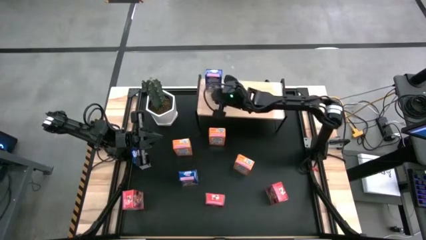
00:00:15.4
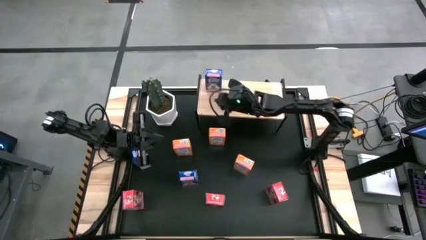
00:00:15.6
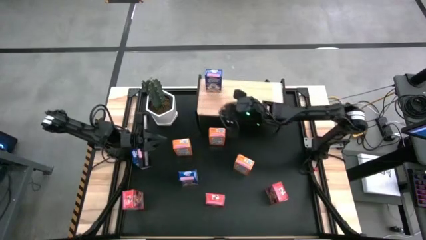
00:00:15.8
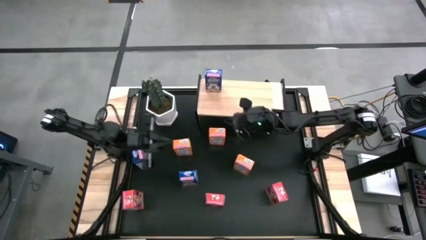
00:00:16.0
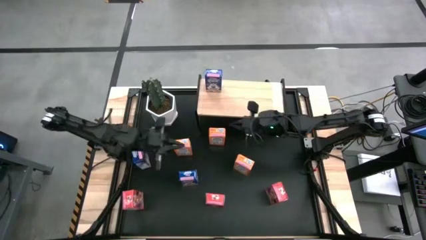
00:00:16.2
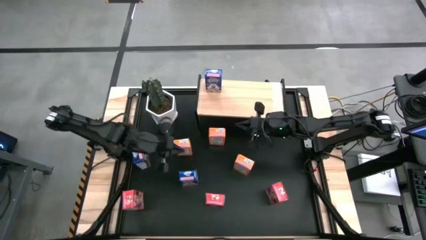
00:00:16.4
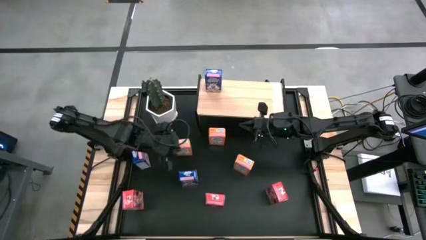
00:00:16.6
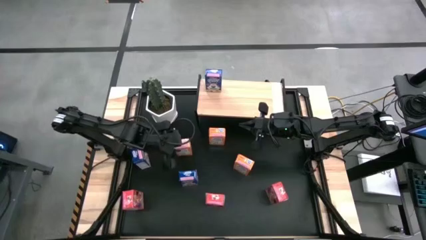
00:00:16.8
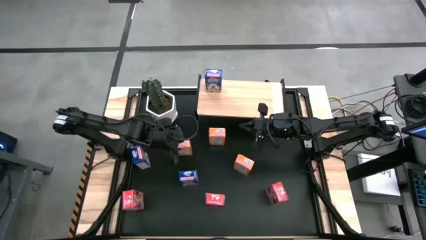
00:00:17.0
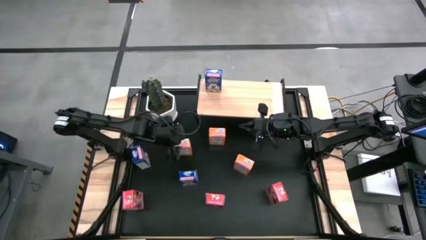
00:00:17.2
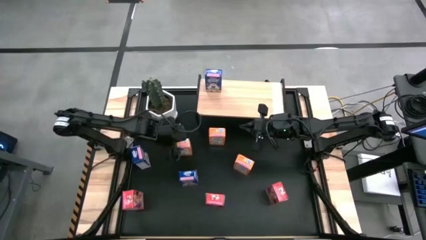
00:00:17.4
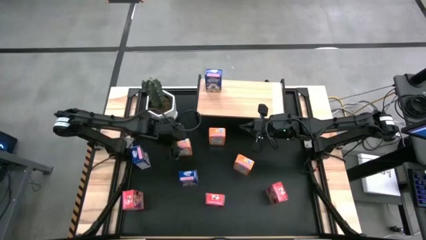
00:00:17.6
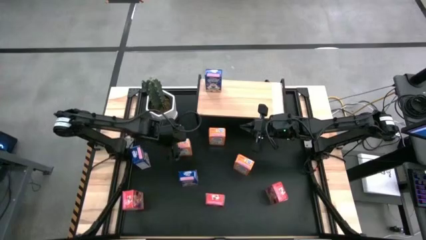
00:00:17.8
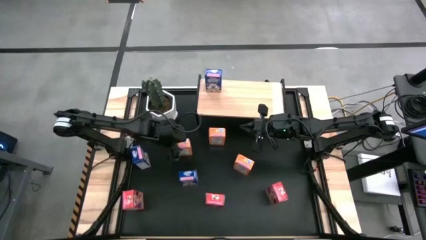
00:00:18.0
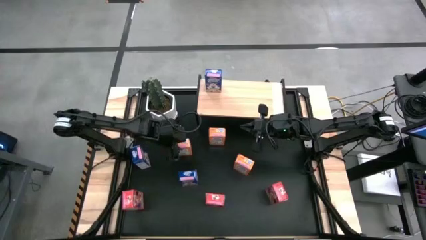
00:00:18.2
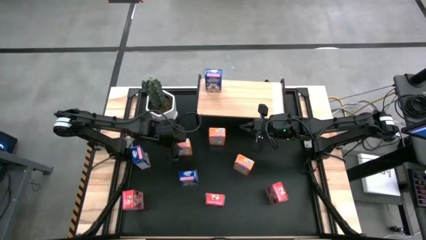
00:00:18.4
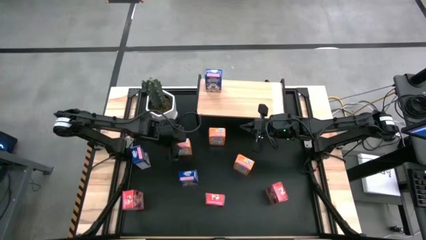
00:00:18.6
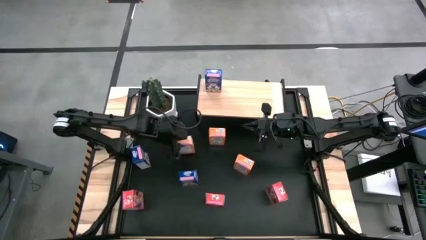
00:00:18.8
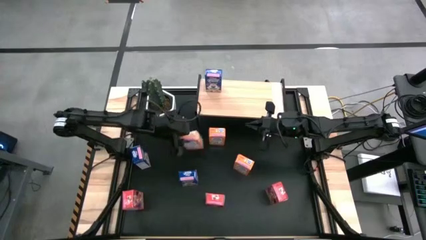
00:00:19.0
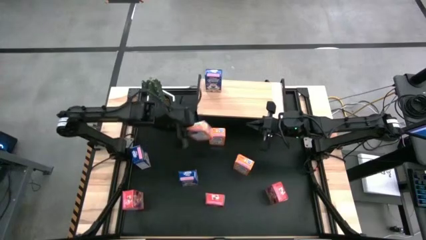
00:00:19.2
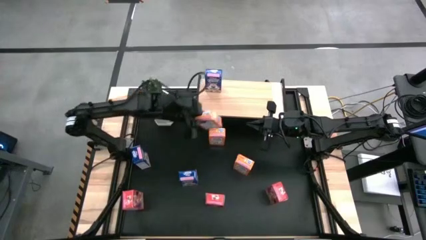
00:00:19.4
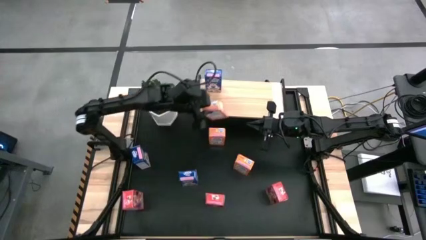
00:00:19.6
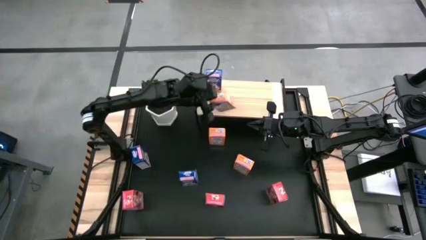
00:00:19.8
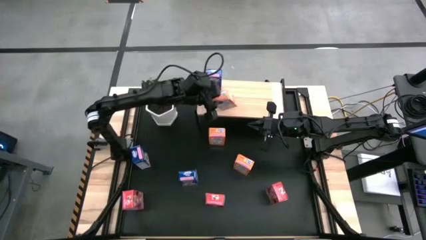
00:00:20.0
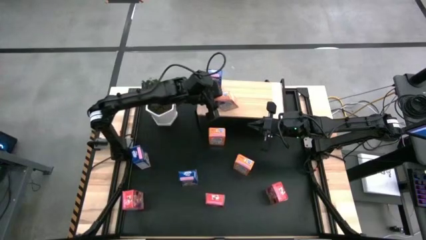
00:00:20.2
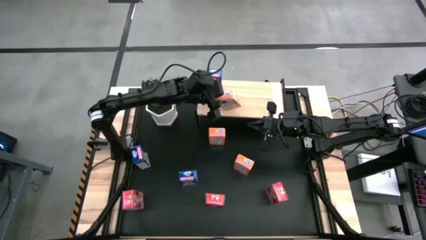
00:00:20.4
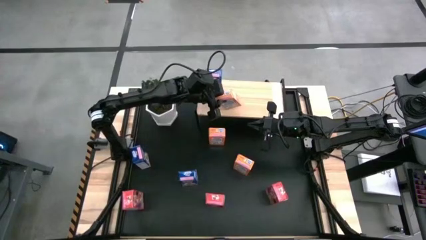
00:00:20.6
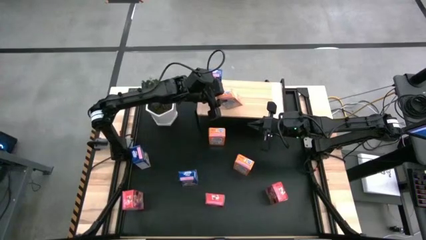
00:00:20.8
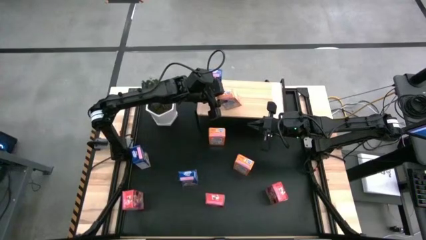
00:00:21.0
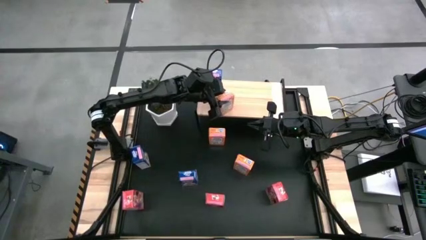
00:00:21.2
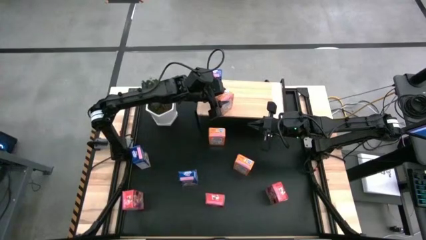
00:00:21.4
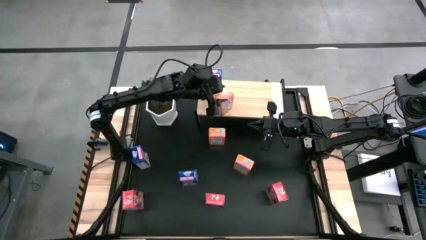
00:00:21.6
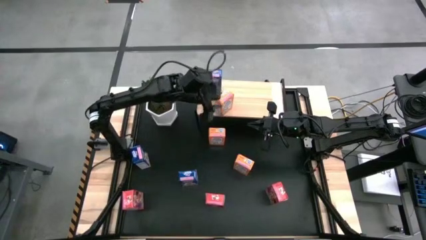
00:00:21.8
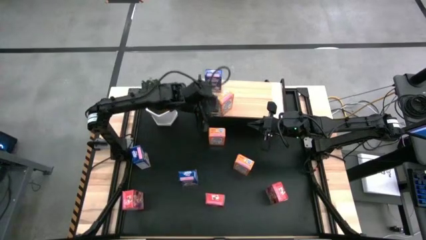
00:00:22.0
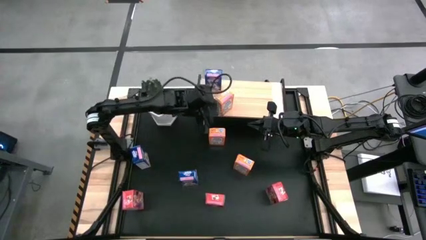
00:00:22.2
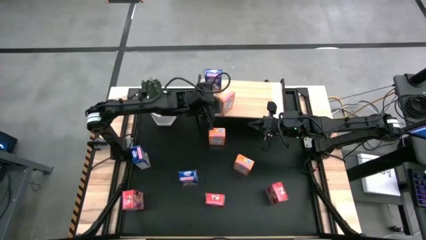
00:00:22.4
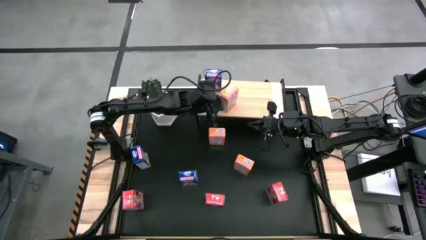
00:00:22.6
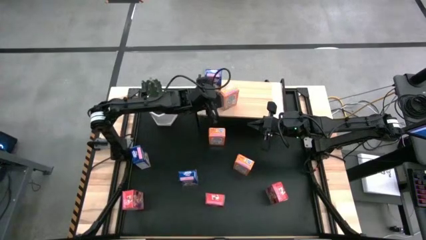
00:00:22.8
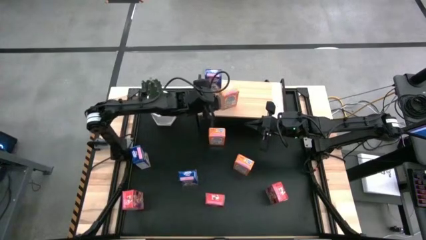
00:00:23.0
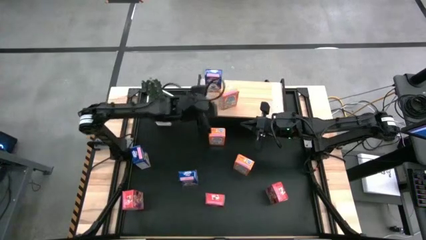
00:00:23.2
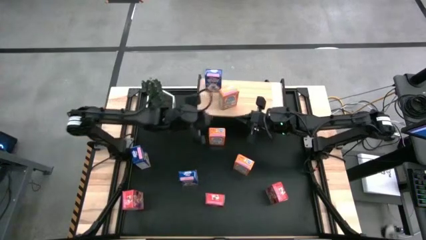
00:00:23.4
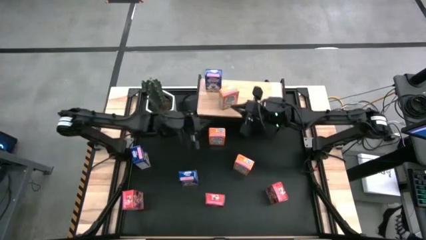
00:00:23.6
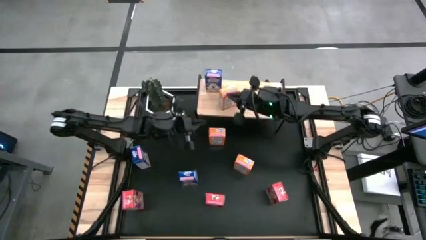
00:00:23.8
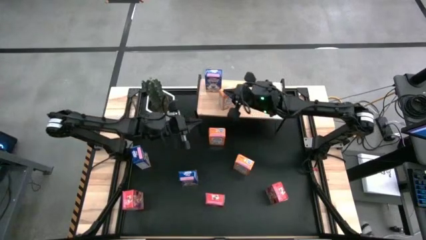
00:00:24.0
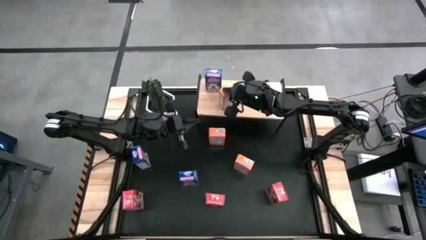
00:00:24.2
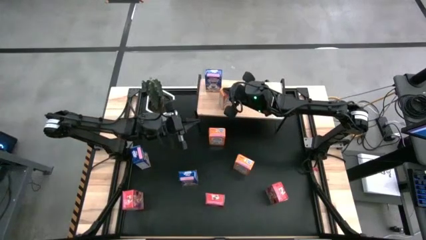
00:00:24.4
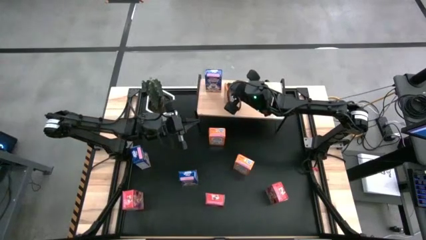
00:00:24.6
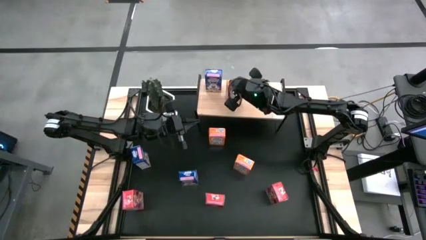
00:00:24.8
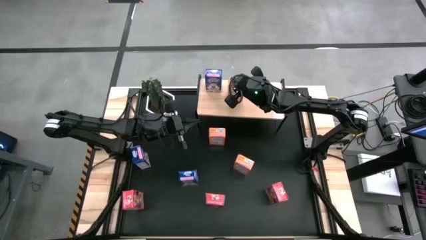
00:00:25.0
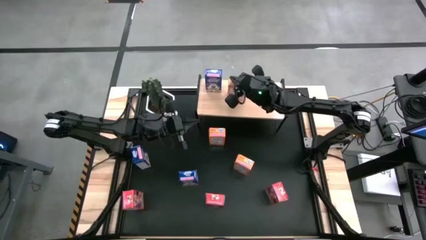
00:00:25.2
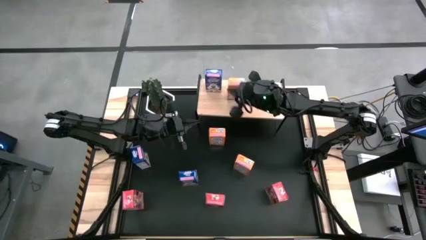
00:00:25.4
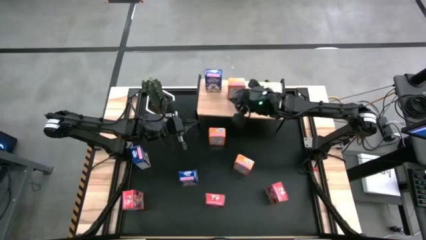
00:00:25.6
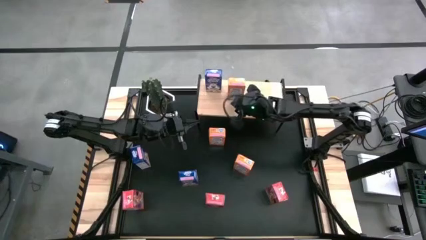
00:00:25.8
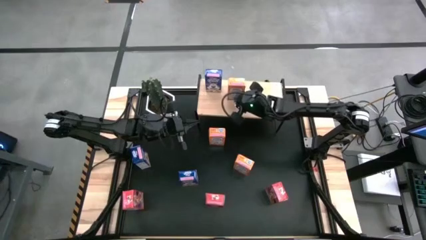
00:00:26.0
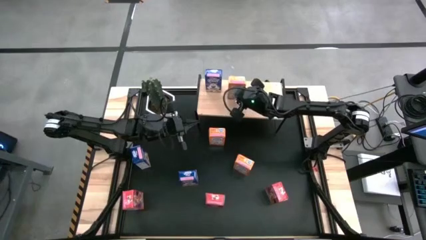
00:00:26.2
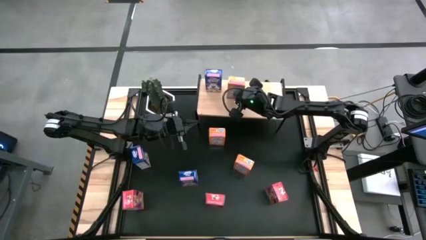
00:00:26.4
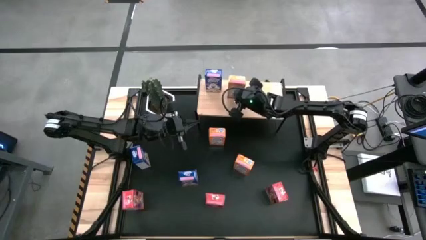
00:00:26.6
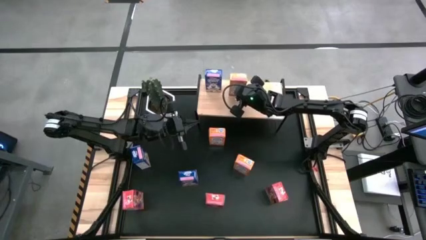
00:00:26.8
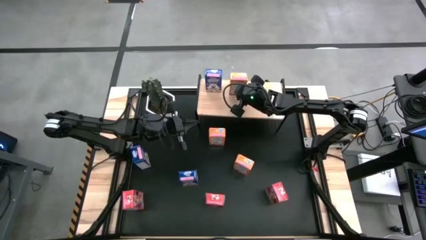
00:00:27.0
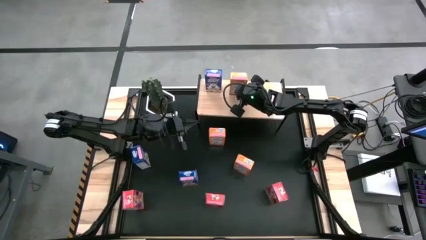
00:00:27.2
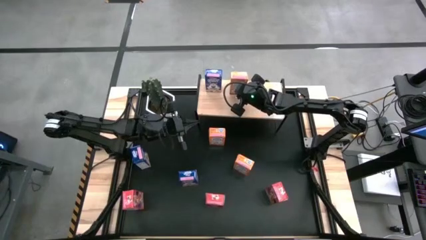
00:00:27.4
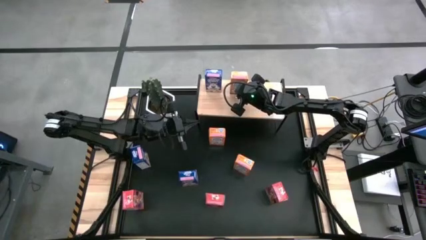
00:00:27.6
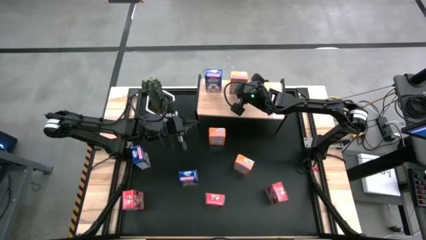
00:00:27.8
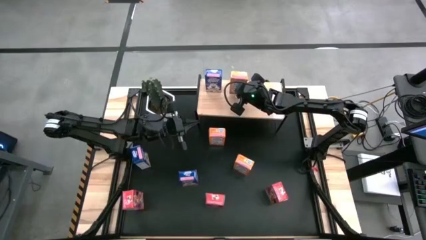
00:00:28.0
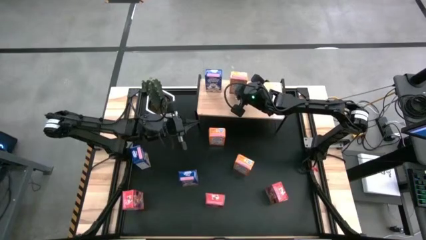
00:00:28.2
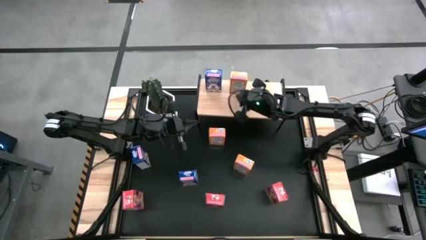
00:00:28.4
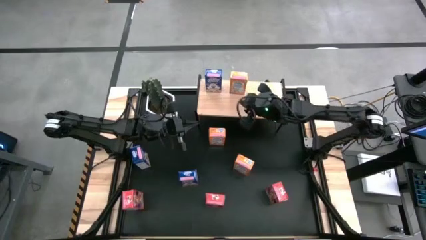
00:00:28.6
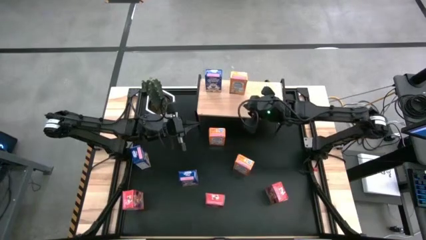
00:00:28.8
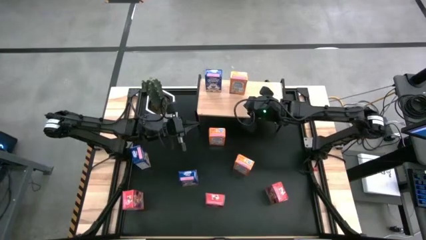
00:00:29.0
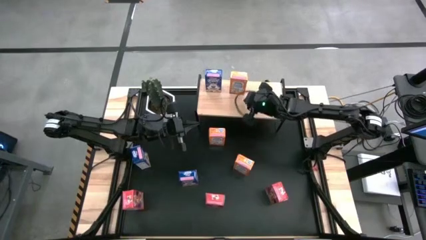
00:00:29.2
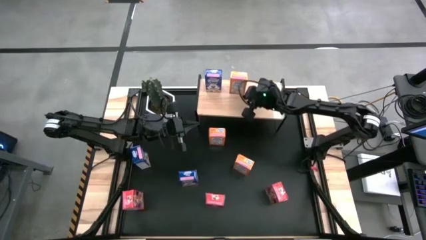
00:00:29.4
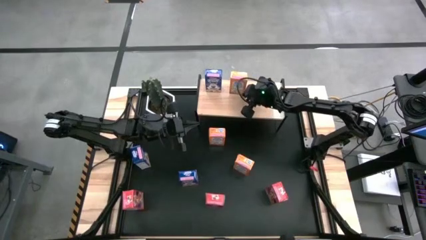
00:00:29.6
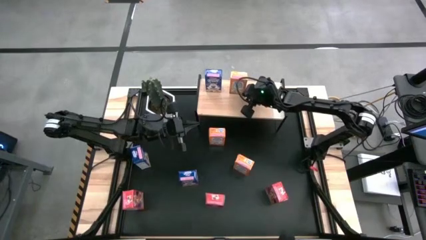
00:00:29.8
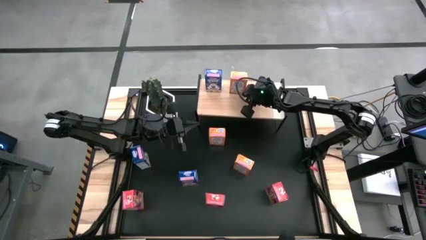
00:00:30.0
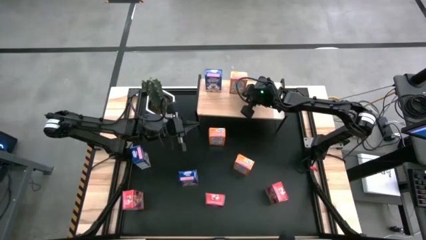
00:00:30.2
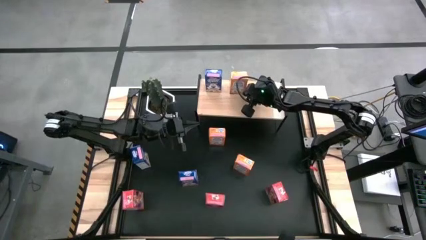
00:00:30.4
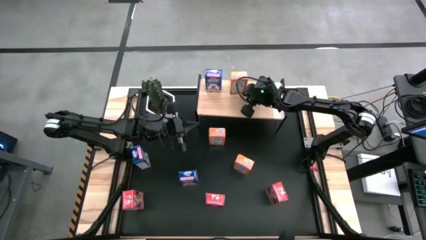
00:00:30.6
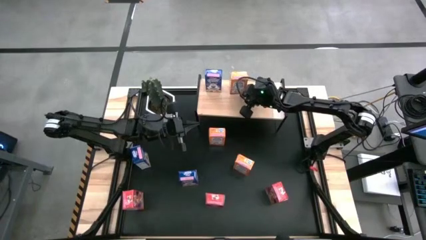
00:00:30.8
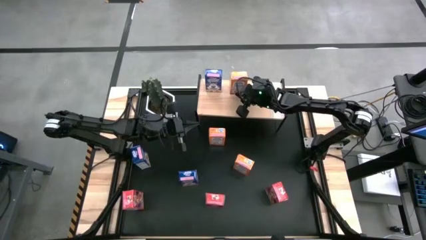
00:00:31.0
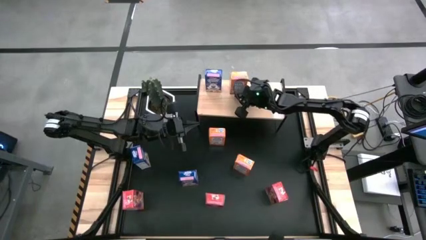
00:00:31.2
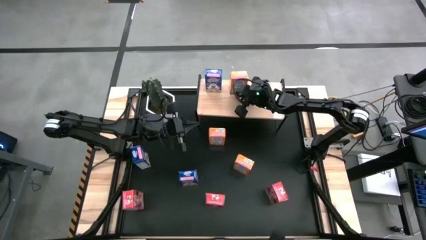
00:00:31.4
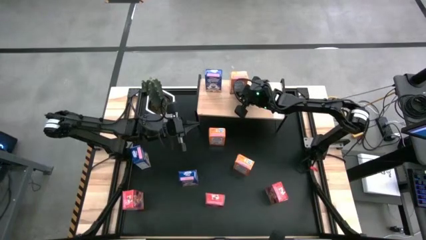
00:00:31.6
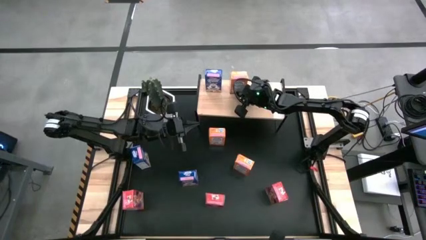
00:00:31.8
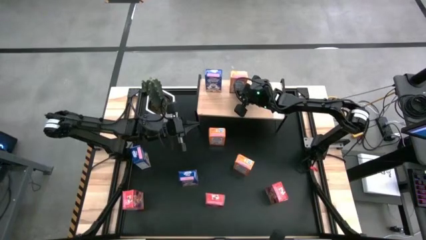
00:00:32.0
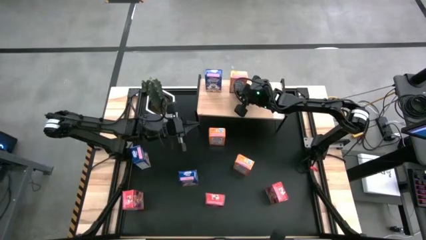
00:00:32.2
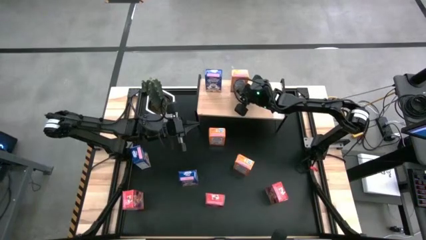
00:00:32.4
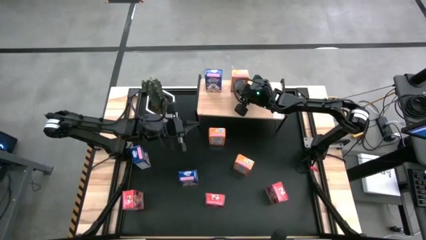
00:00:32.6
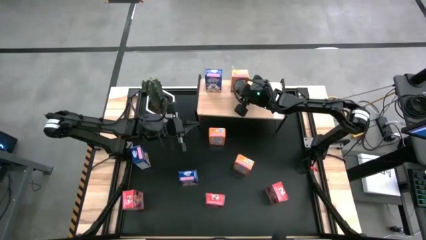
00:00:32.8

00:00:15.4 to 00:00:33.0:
Task: Stack cereal on shelf
Put the left orange cereal box on the shelf
